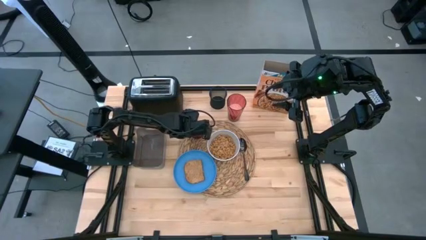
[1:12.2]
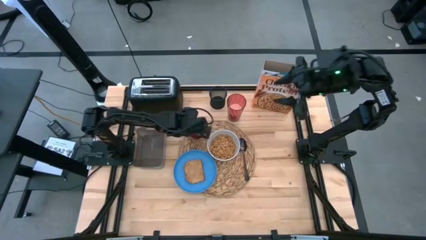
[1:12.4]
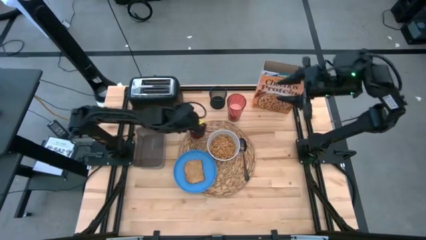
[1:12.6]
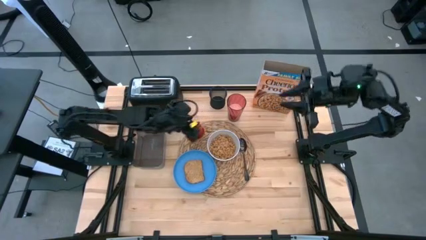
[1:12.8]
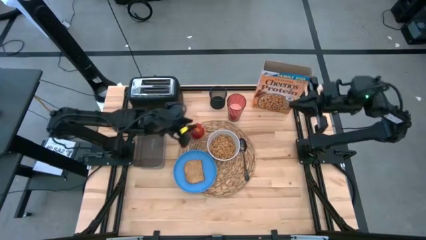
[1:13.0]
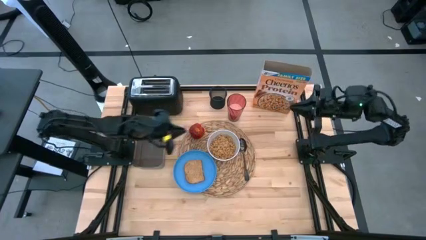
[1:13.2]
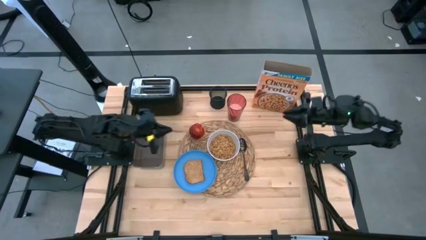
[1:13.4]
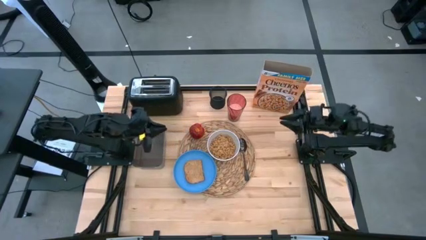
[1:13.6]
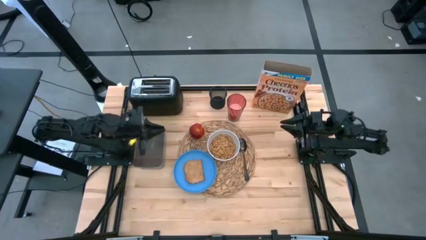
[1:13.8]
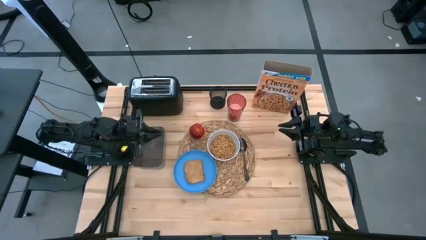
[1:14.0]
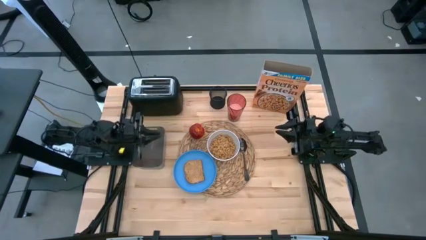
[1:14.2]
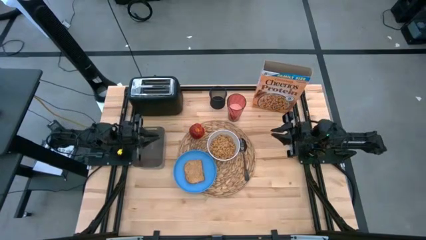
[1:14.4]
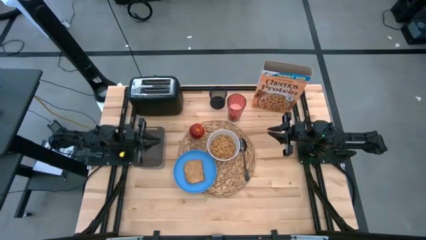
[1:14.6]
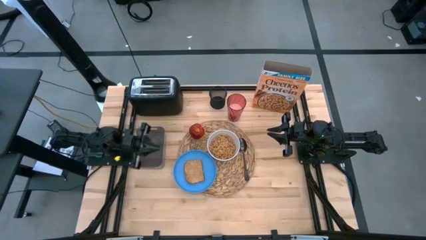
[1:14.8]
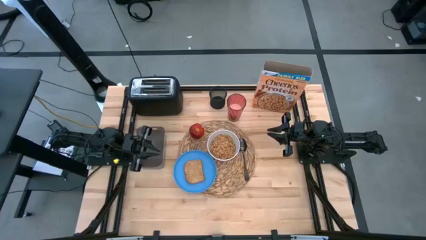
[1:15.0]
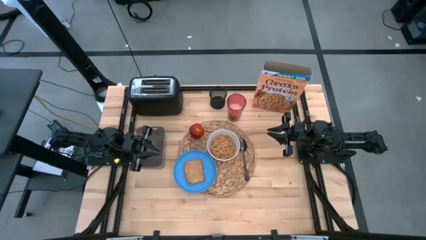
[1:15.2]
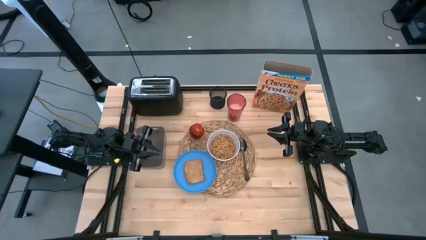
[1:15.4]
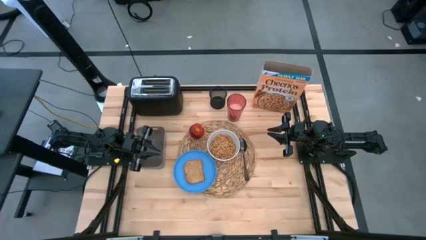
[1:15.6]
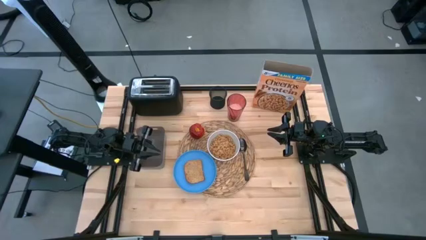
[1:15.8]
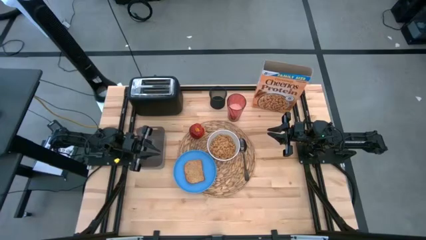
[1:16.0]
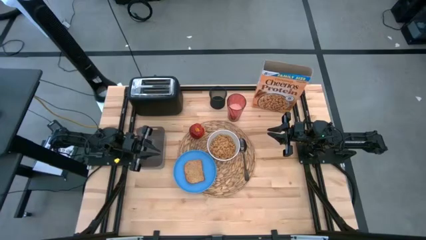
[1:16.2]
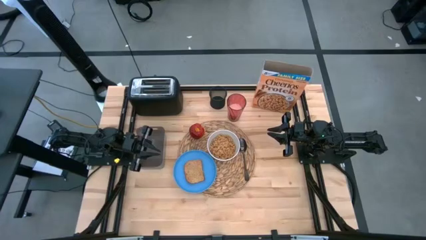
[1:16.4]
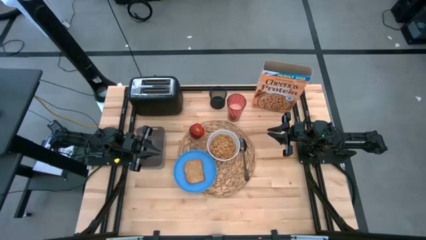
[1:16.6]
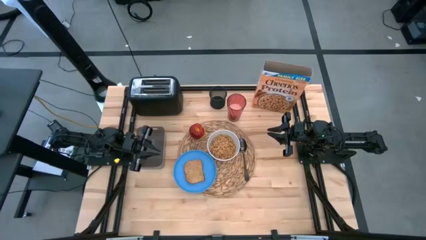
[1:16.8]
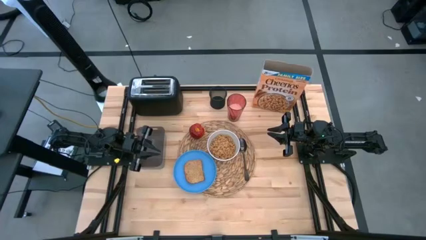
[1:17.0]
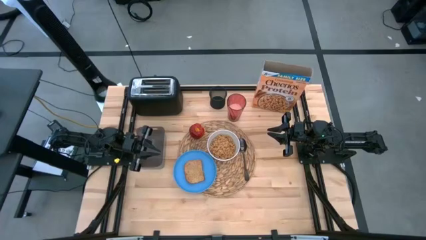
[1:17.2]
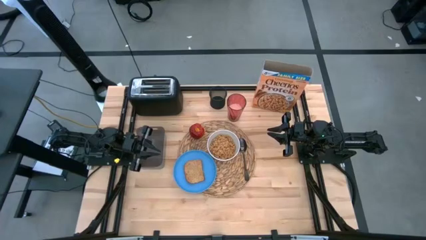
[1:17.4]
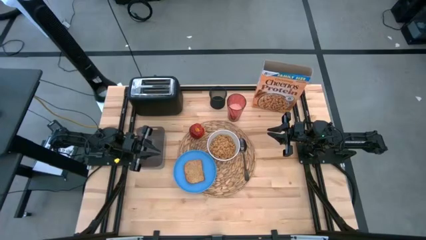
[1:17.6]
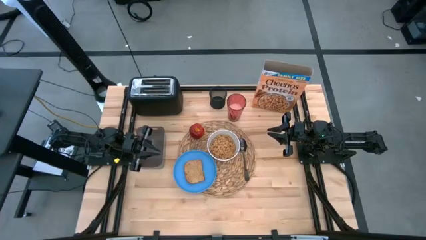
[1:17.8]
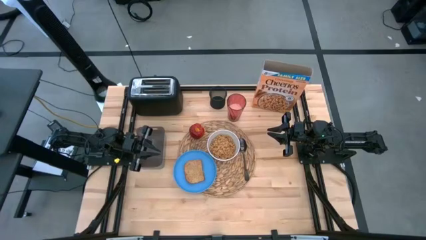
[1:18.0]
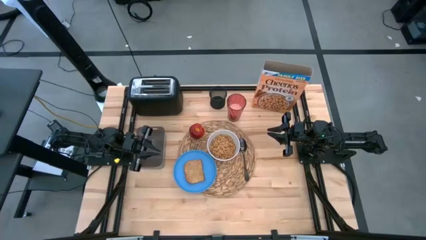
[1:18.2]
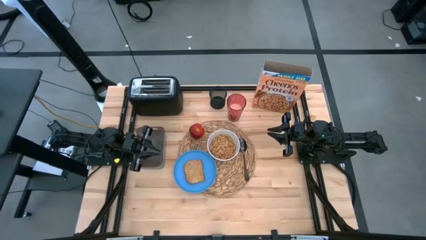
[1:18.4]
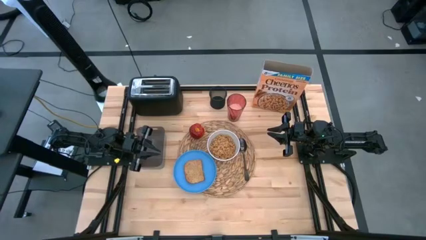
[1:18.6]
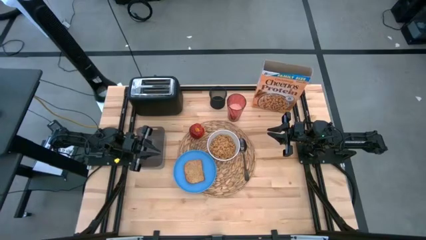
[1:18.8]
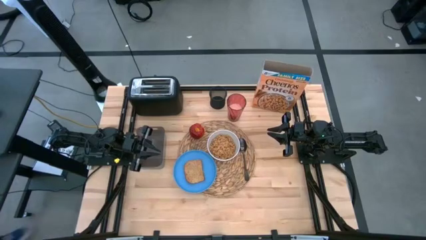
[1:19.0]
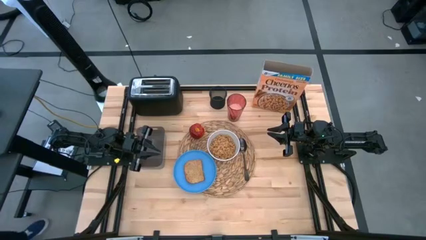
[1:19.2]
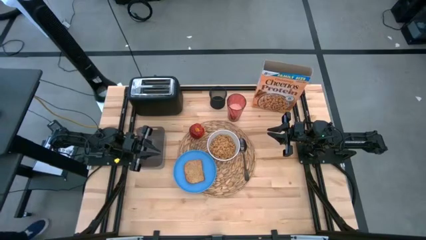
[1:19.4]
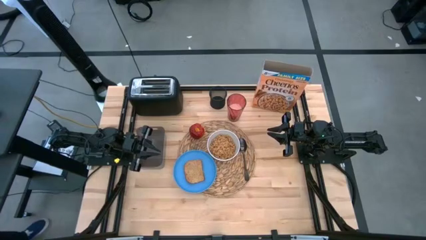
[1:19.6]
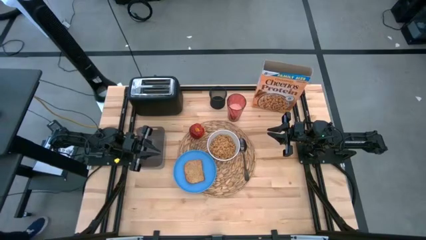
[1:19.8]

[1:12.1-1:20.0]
Task: Arrange a breakfast setting
Return to Home Position

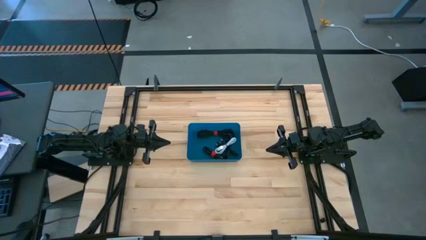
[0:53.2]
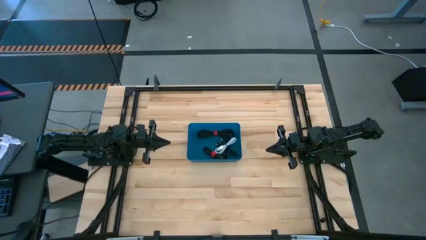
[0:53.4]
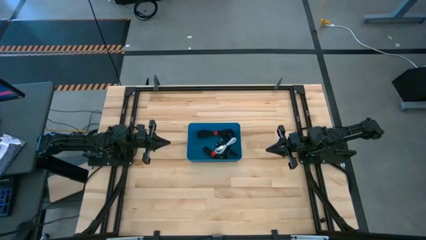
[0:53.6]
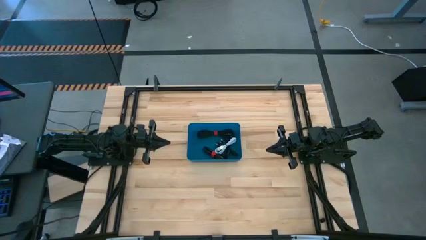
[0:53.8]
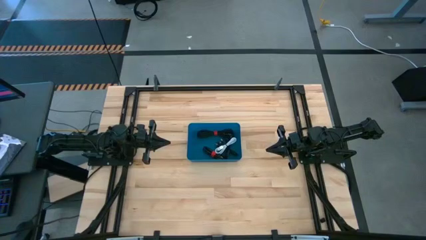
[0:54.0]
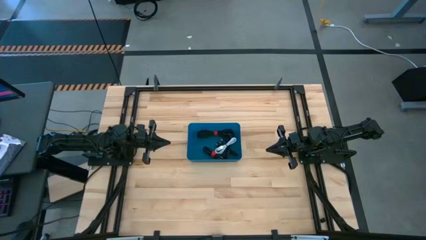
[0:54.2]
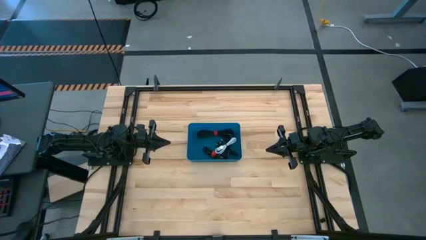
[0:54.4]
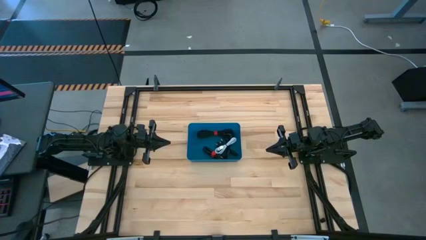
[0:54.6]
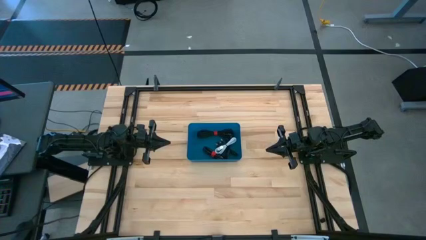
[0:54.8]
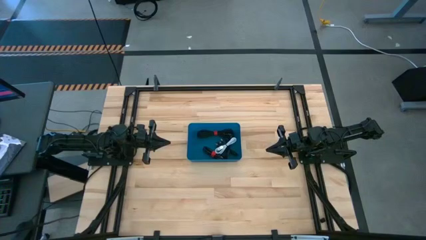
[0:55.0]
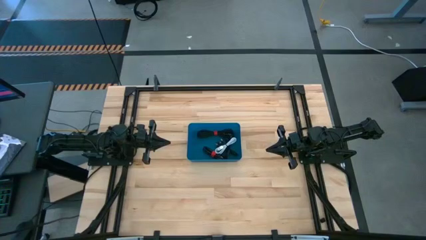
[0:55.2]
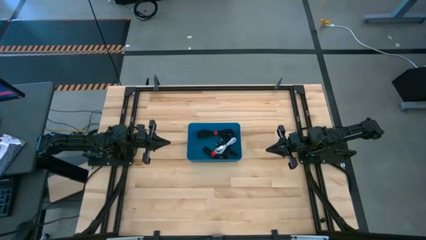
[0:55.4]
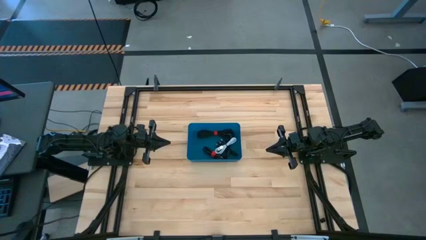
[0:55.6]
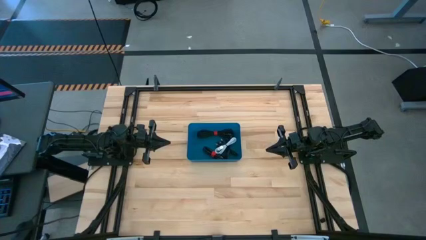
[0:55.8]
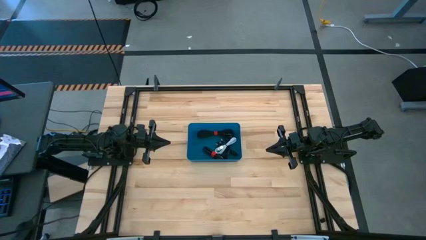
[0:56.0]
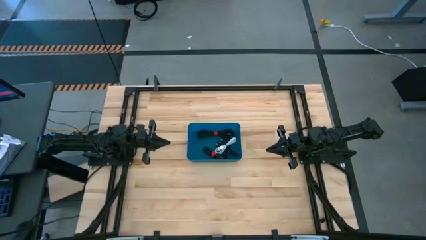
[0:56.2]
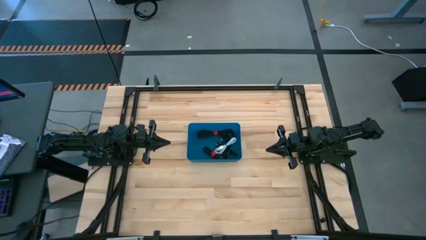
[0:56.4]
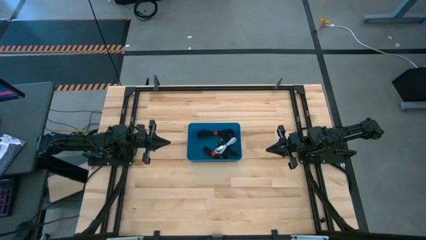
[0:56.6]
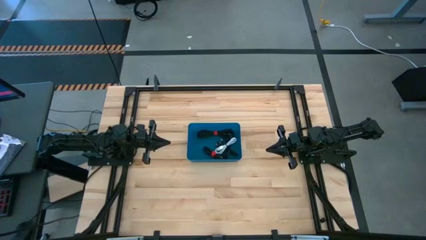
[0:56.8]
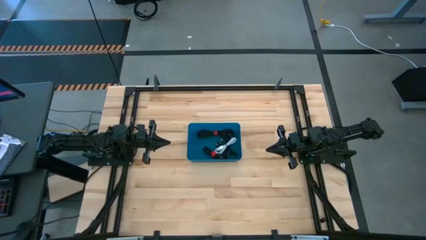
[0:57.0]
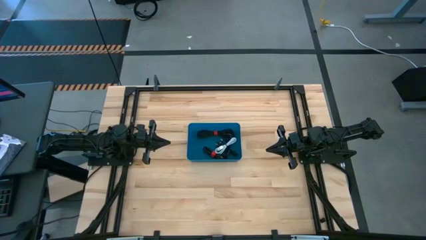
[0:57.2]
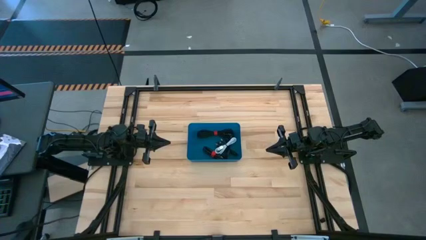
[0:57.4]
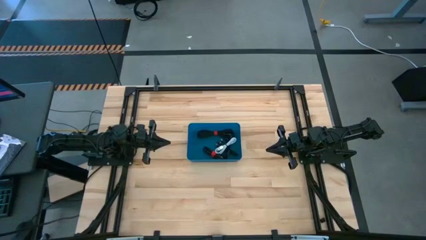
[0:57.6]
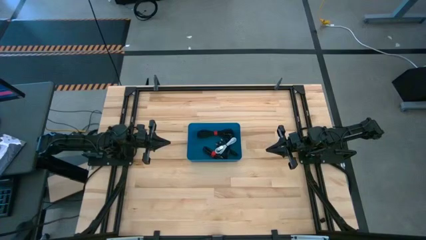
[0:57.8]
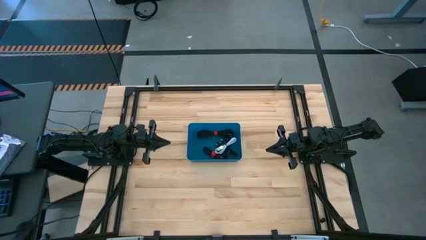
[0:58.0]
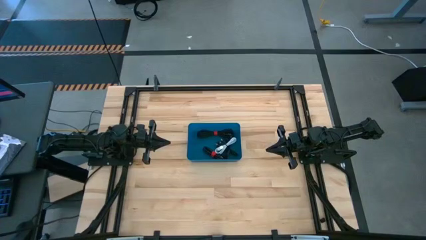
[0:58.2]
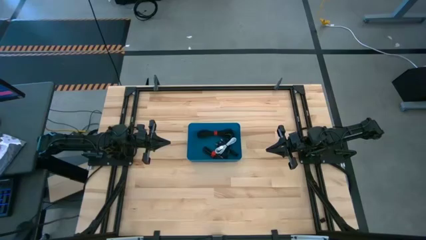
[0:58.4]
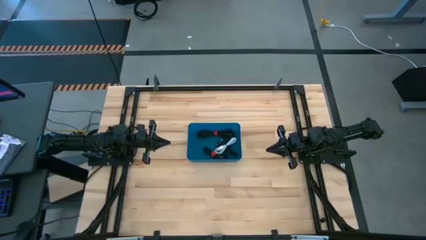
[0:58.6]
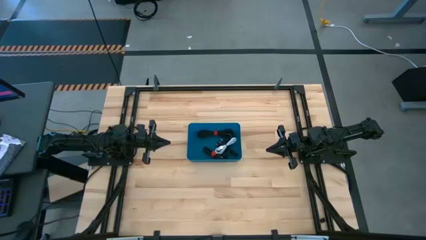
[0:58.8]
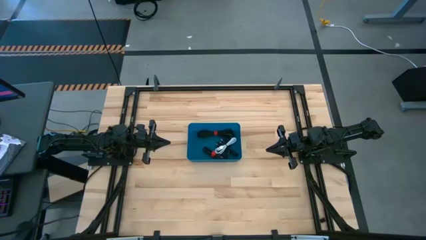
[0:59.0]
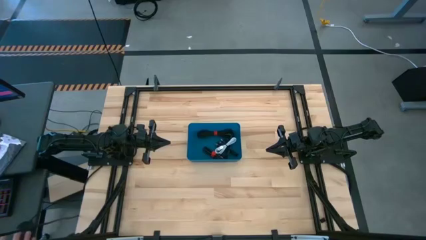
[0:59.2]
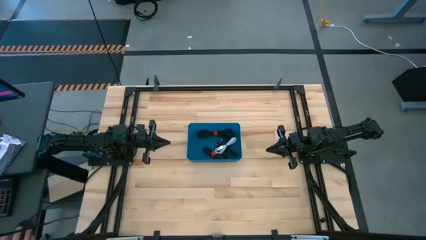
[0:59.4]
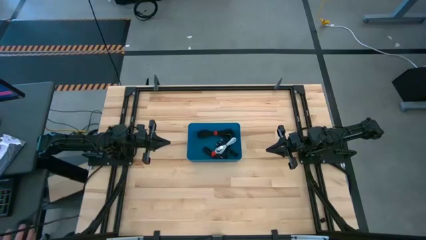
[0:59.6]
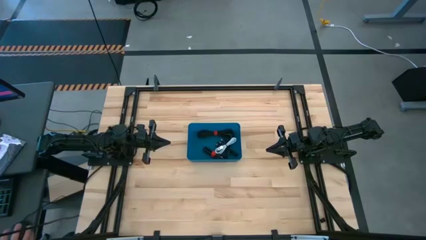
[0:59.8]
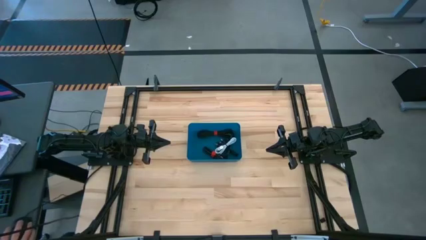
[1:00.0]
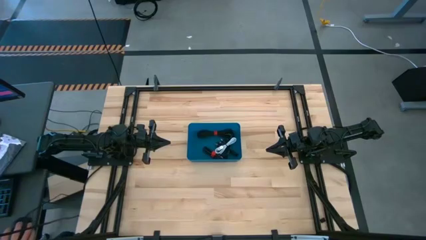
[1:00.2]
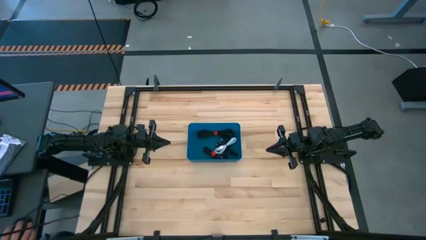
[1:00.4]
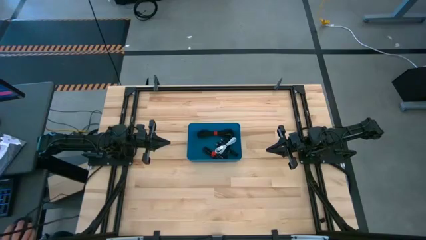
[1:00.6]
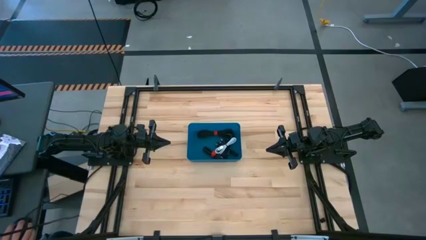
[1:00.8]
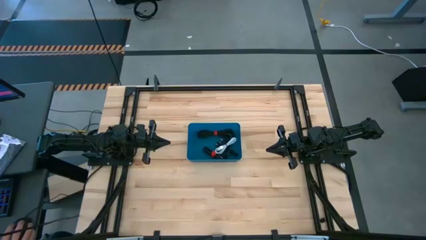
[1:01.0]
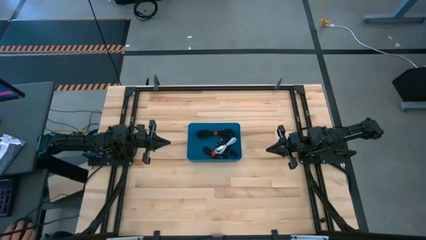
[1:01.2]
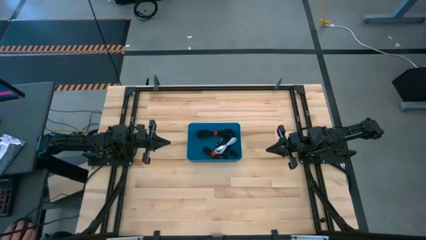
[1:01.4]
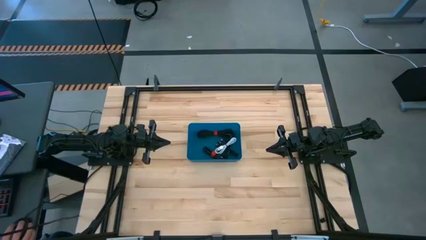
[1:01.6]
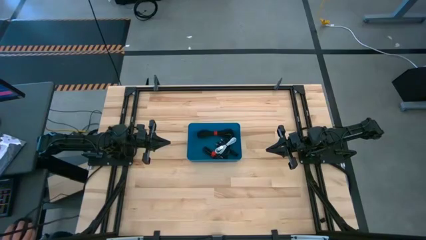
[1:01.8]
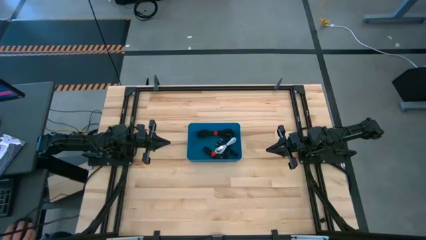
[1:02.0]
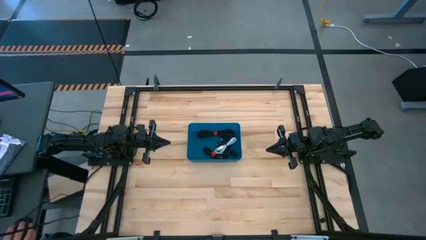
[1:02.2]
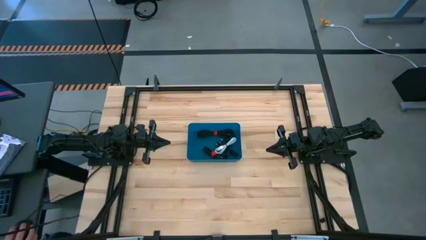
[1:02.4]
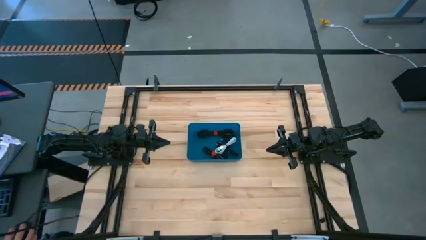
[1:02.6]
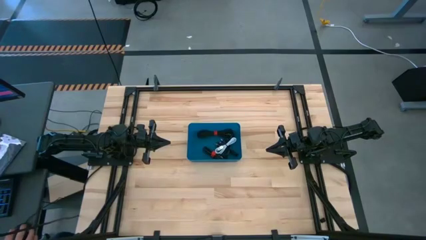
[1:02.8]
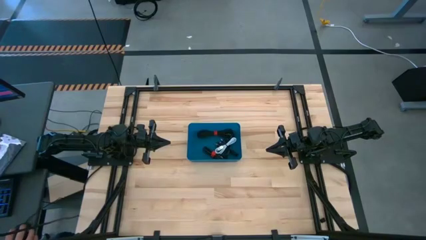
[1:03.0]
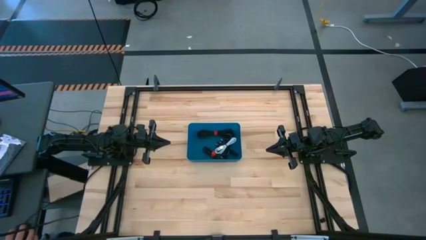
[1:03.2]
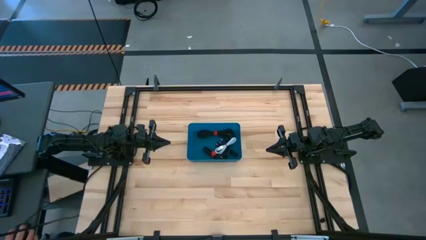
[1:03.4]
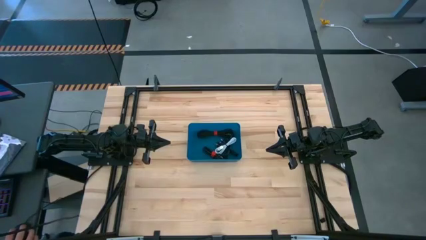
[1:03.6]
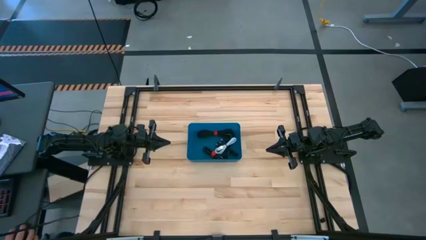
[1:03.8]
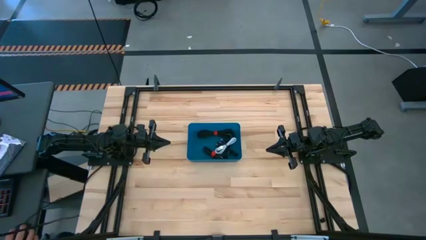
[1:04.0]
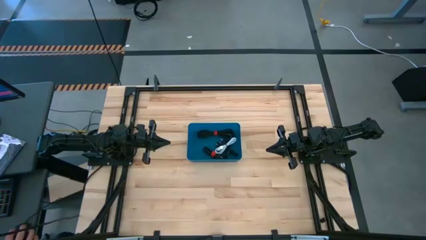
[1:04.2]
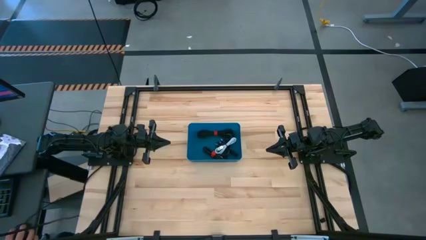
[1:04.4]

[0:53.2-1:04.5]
Task: Pick and place USB-C Cables
Return to Home Position
